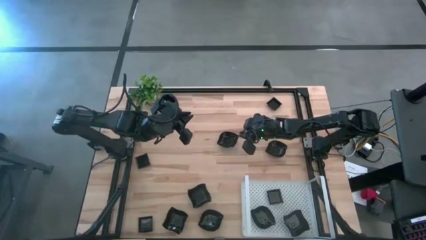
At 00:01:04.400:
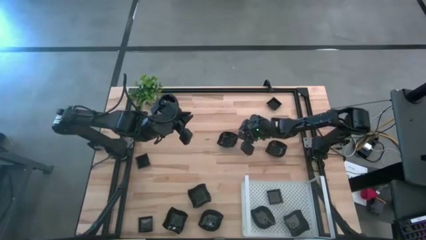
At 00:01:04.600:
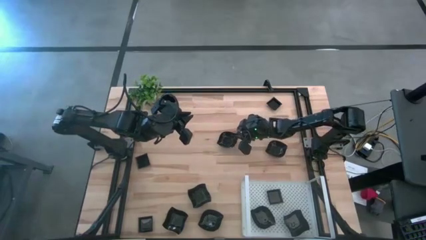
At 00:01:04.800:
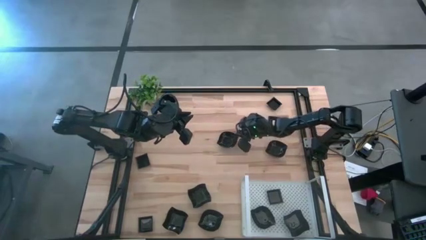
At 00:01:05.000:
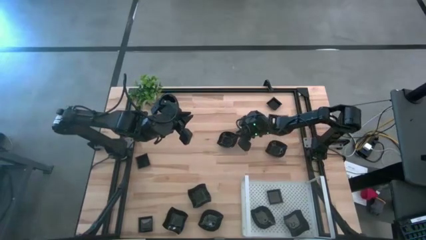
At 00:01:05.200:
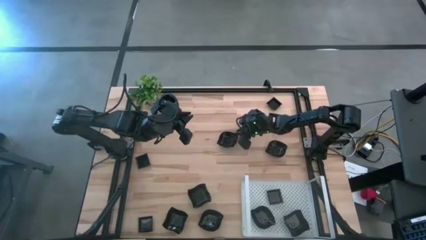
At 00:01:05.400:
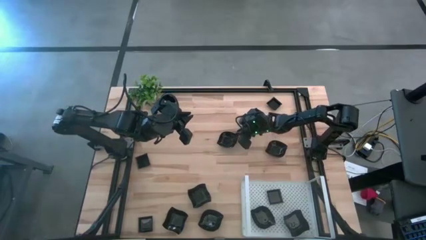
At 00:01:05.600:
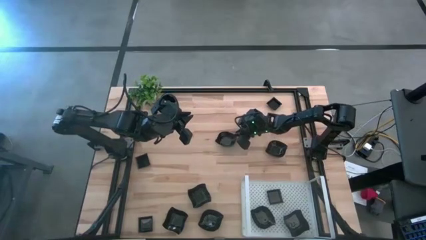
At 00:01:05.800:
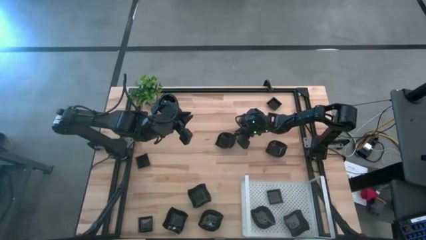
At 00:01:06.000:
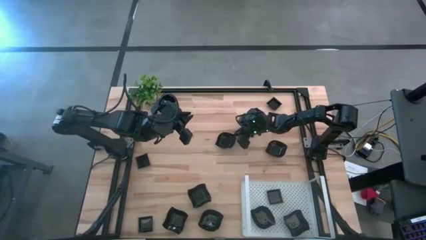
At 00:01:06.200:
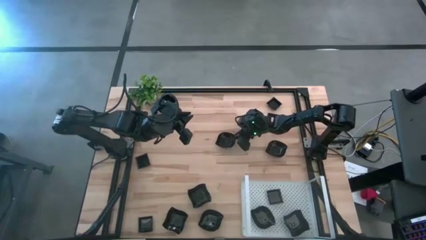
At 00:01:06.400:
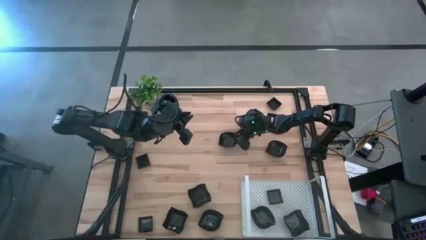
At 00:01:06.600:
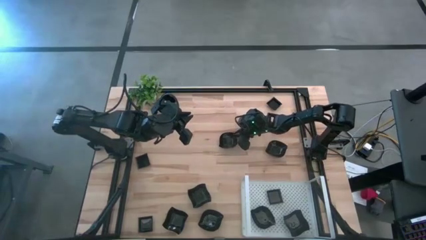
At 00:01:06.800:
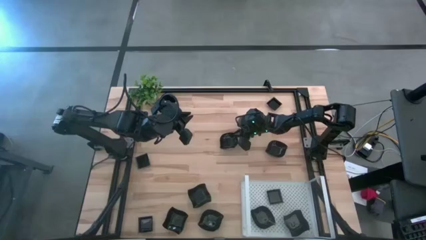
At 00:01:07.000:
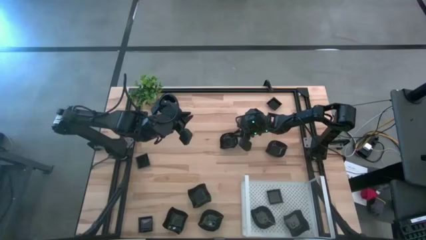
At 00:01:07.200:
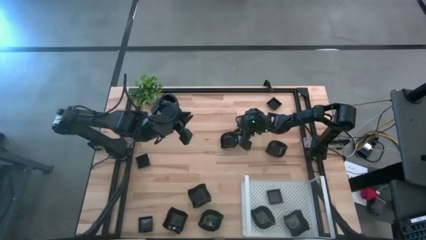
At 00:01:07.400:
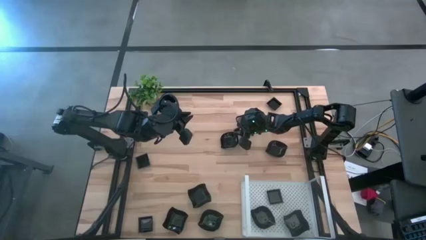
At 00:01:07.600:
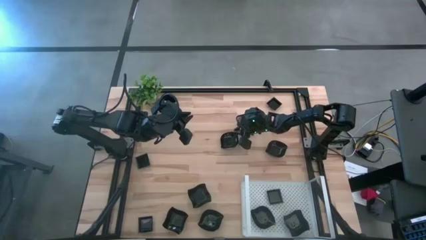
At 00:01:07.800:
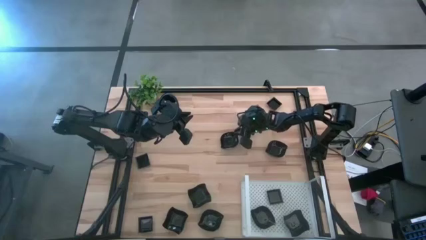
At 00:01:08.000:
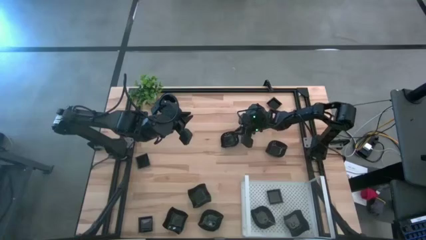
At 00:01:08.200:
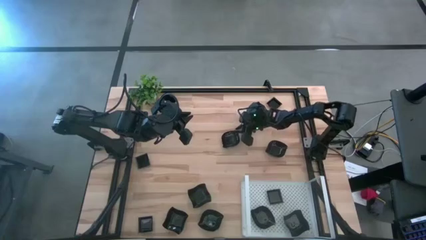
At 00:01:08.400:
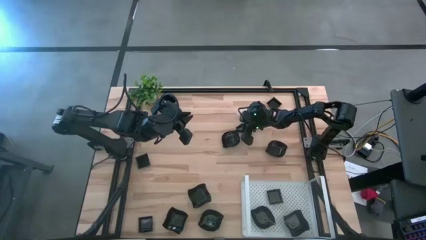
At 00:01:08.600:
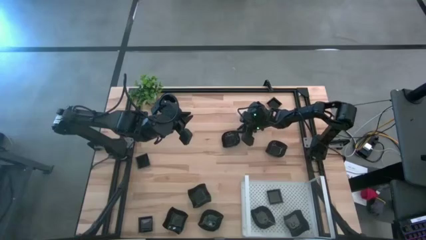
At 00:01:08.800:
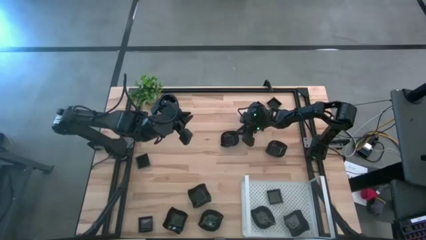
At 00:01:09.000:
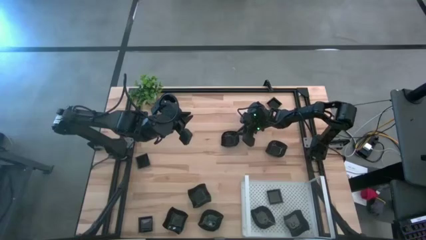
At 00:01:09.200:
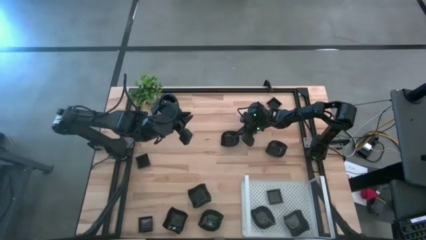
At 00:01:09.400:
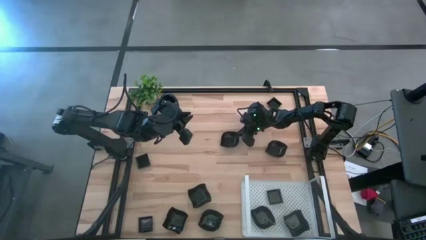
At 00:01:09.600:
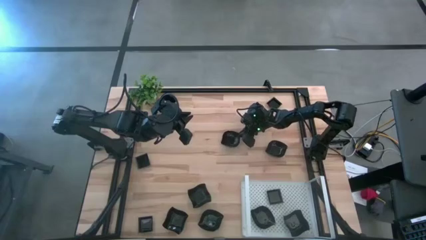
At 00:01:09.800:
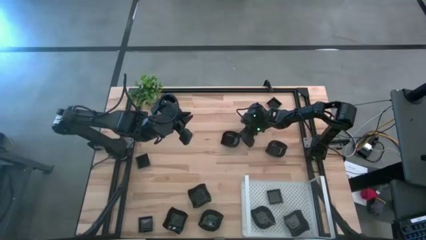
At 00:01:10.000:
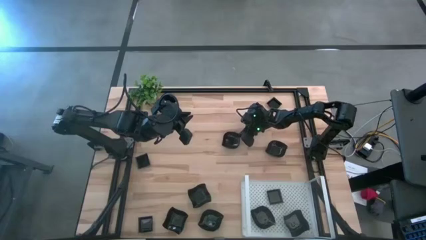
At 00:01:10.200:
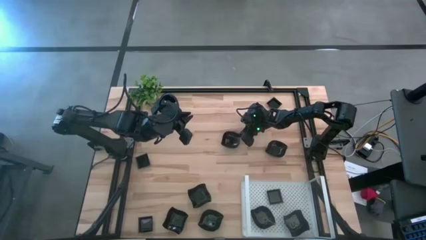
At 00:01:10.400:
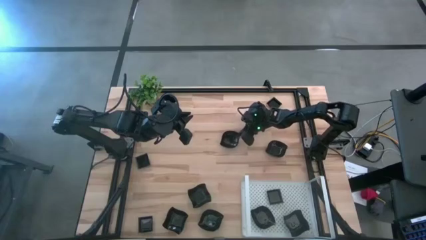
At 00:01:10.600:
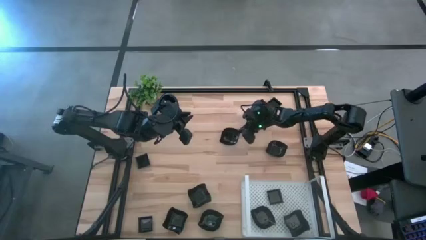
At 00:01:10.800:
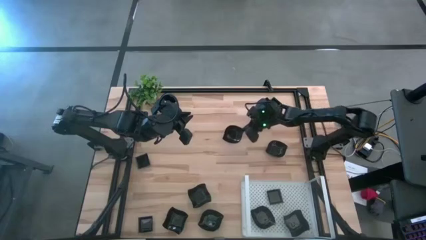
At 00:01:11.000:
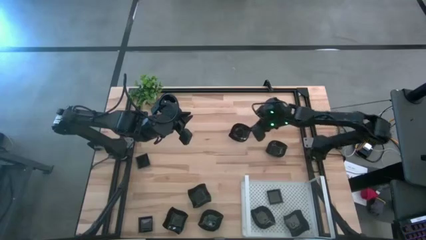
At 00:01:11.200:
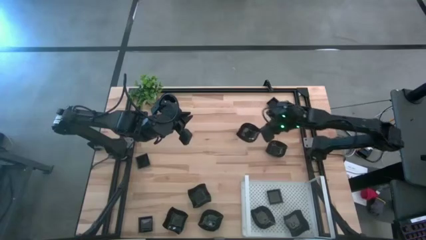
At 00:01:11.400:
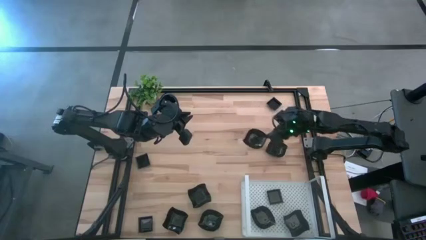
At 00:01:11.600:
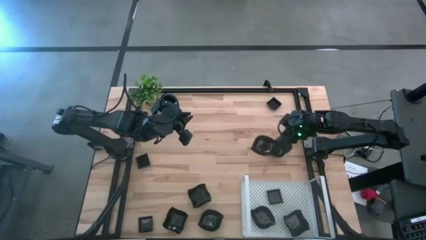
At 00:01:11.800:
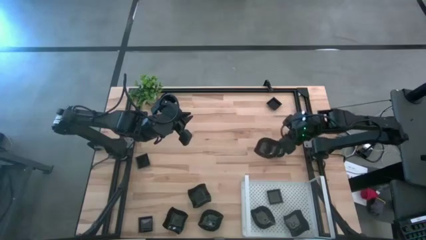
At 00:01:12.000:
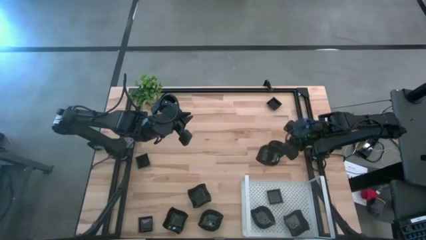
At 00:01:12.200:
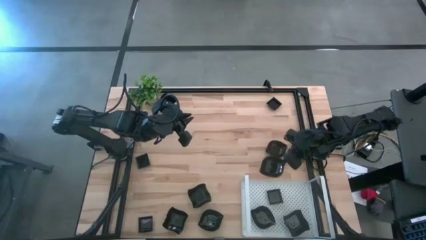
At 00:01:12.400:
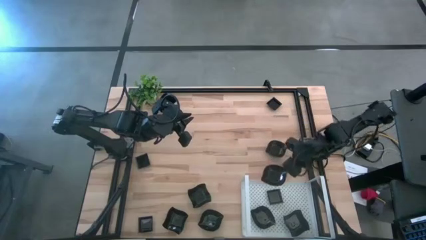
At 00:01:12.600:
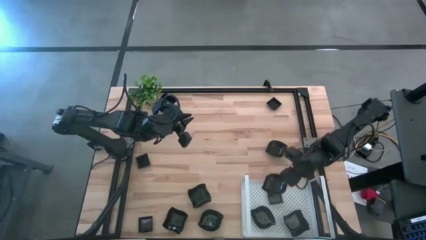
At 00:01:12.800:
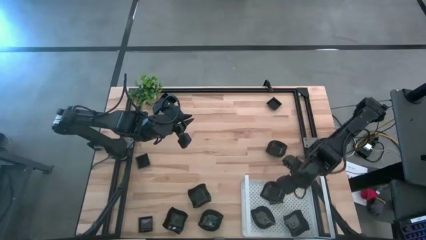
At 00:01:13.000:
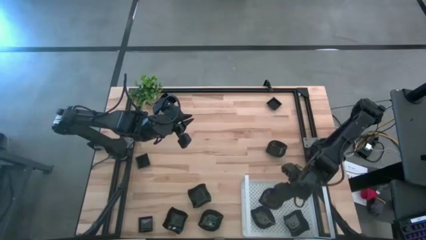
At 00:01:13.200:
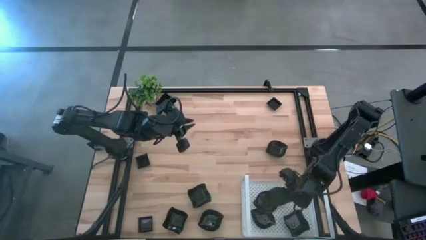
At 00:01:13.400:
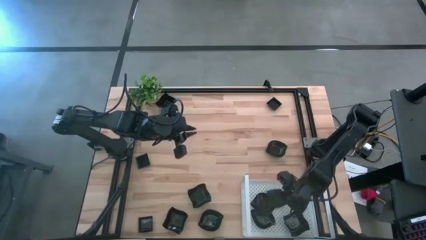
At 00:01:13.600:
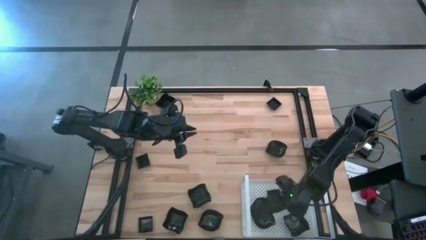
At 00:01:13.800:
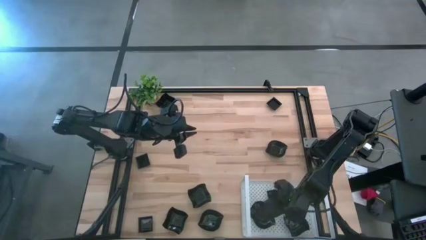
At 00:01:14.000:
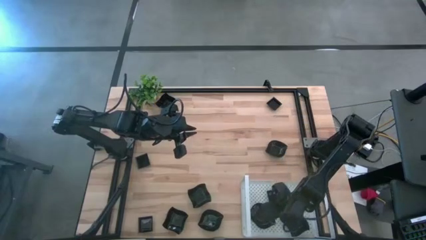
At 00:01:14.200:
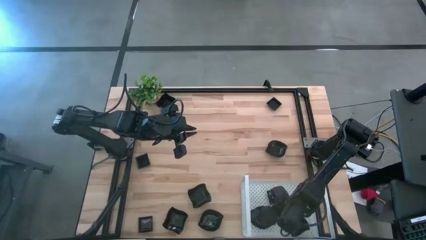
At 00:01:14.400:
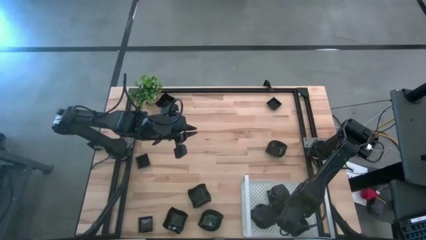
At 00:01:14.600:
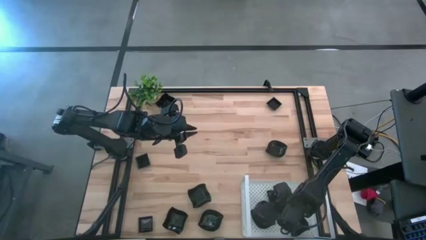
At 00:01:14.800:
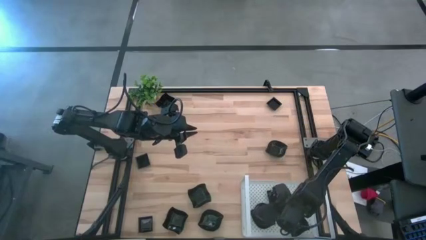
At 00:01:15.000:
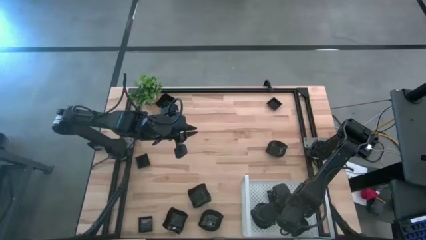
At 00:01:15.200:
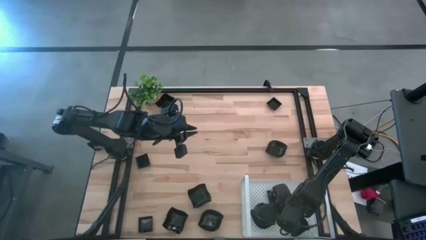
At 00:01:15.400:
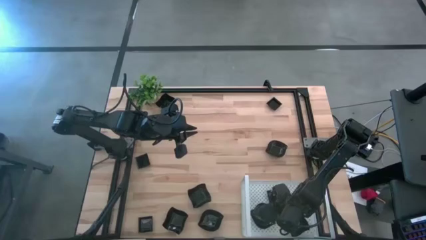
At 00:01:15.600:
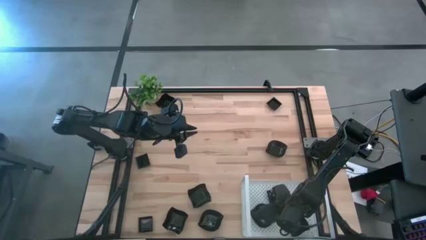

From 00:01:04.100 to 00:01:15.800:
Task: Pick & Place Mini shaped plates
Stack the leaf shaped plate on top of the other leaf shaped plate on the shelf
